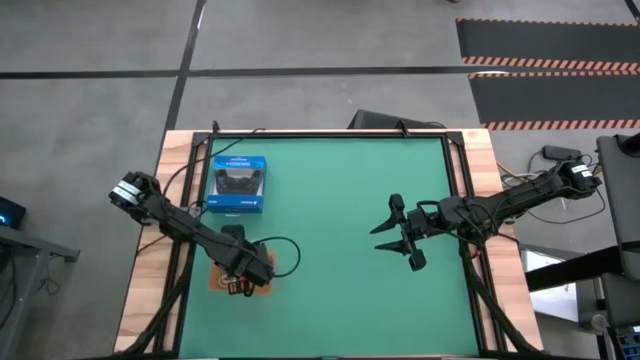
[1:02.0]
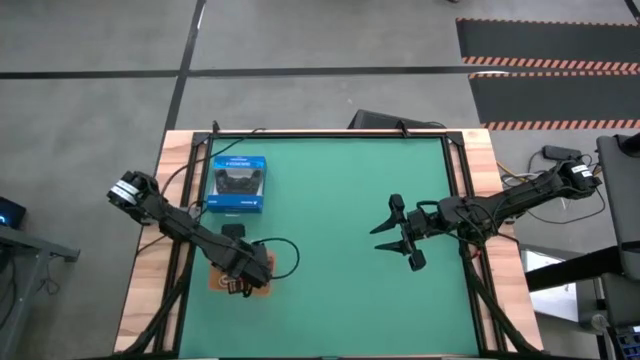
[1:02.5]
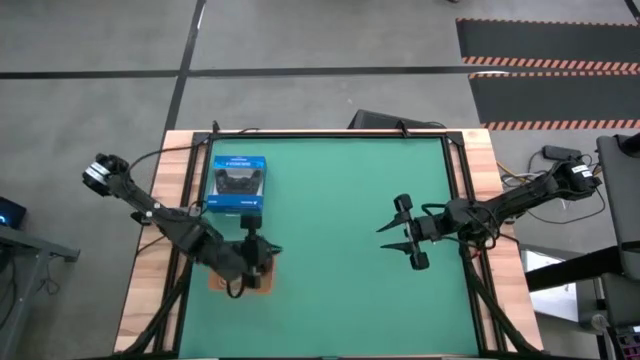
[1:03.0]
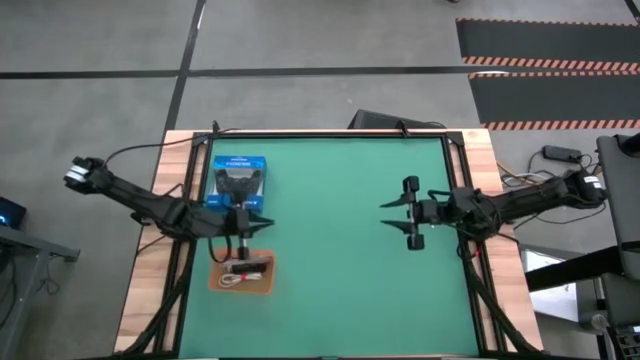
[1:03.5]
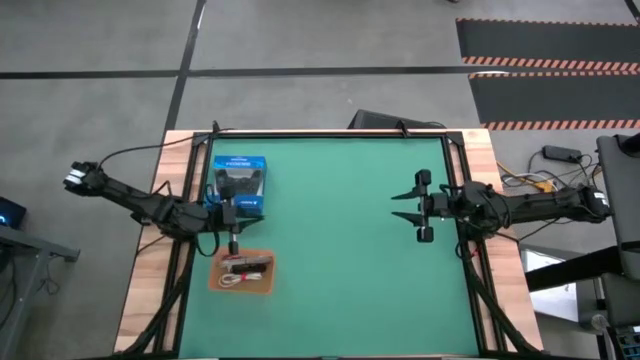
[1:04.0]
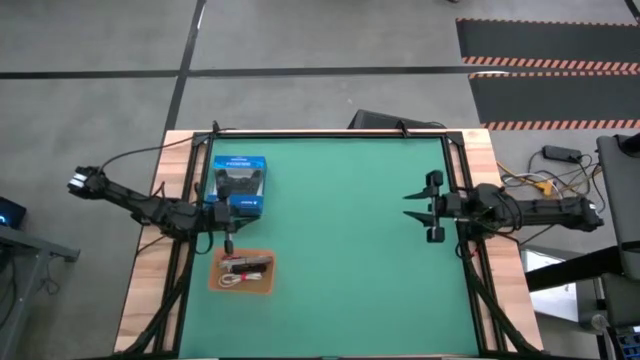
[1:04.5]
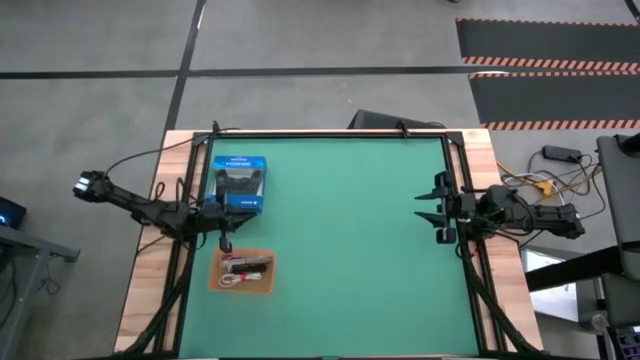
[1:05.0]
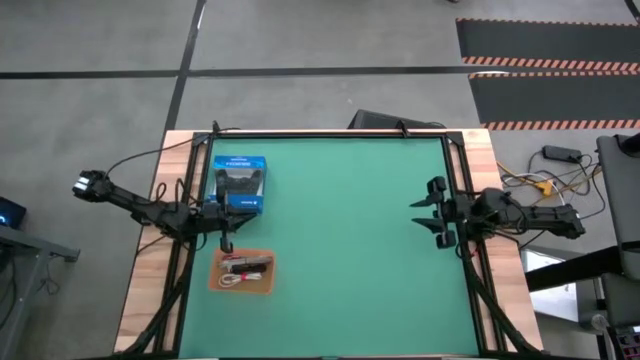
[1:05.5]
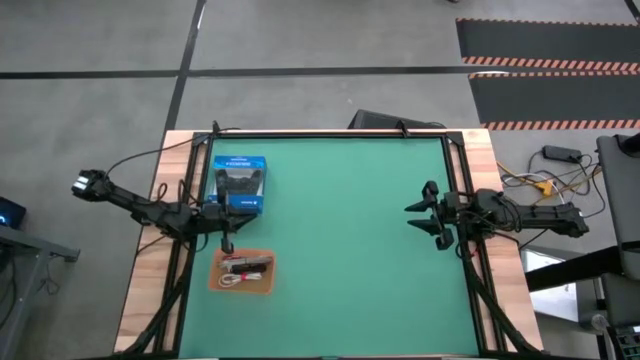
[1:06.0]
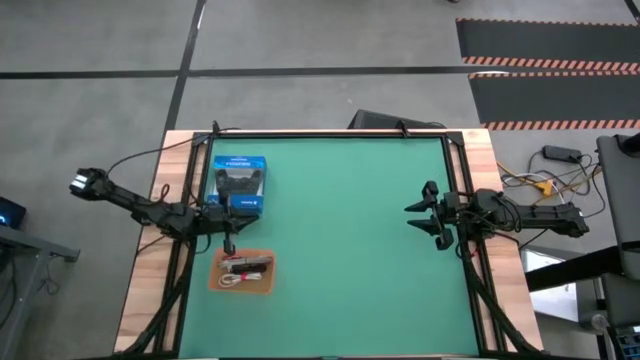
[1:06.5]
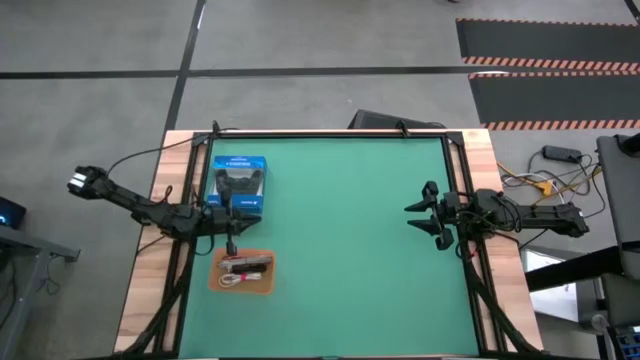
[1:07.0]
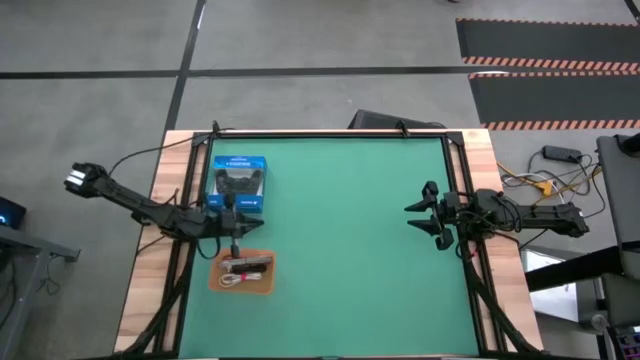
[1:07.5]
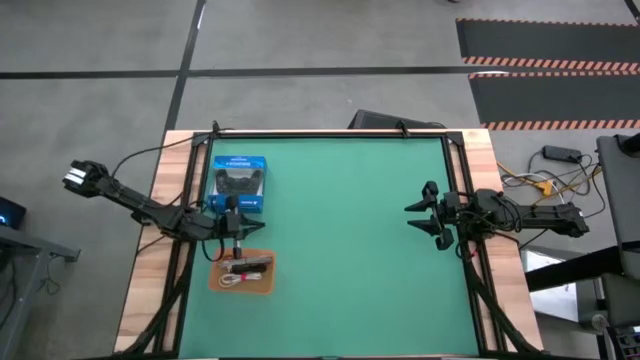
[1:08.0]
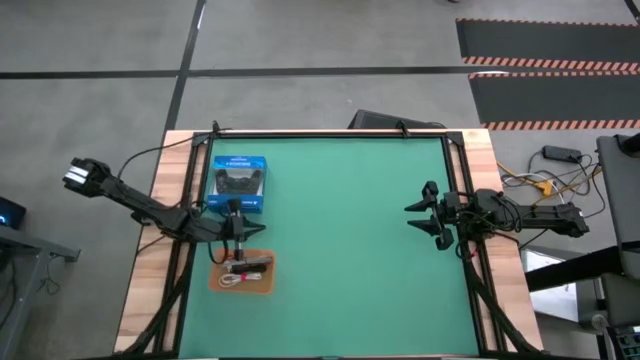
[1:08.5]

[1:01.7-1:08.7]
Task: Pick and place USB-C Cables
Return to Home Position

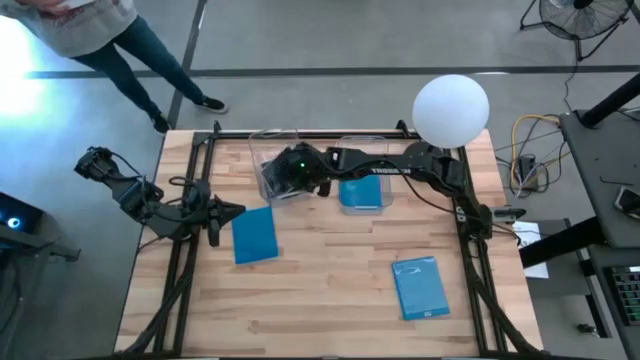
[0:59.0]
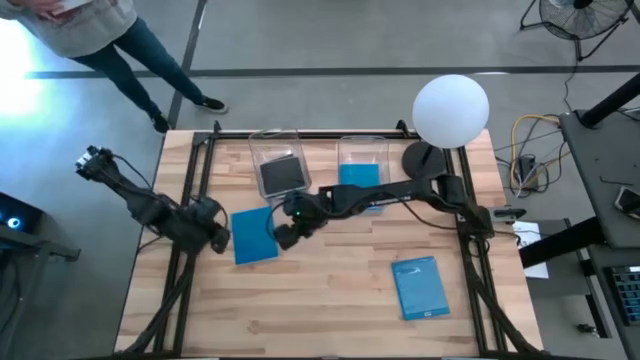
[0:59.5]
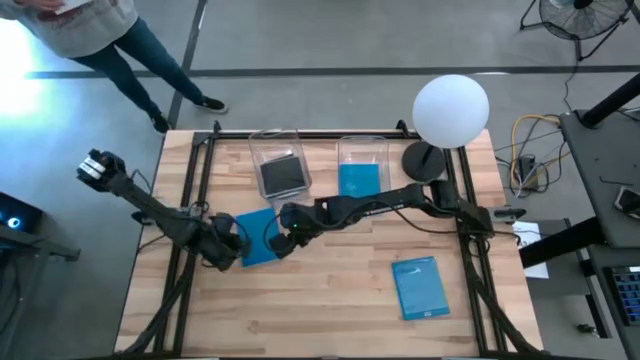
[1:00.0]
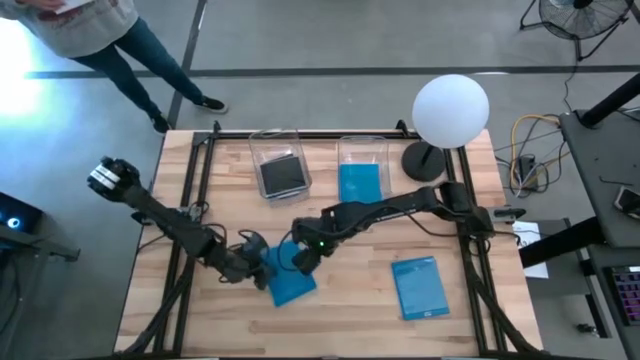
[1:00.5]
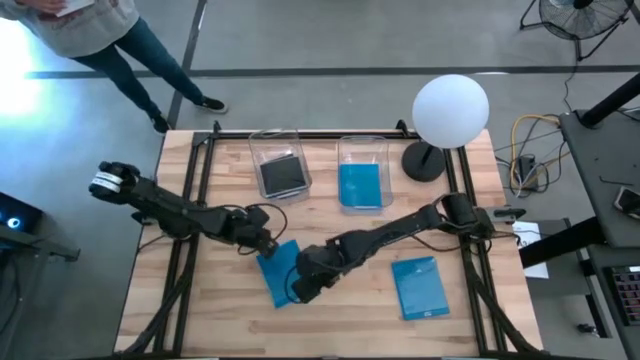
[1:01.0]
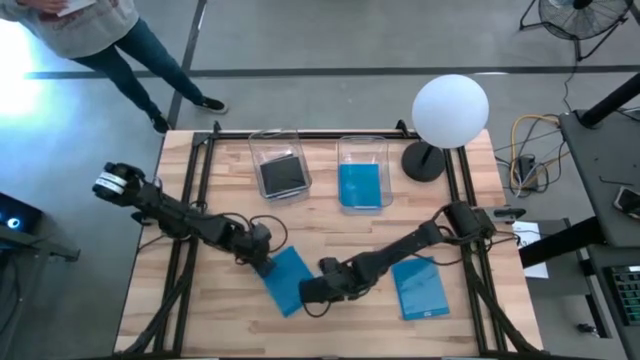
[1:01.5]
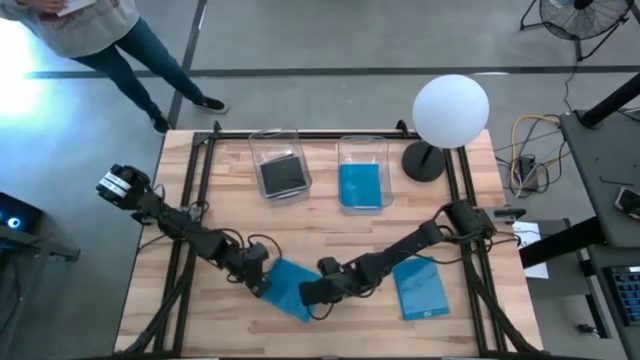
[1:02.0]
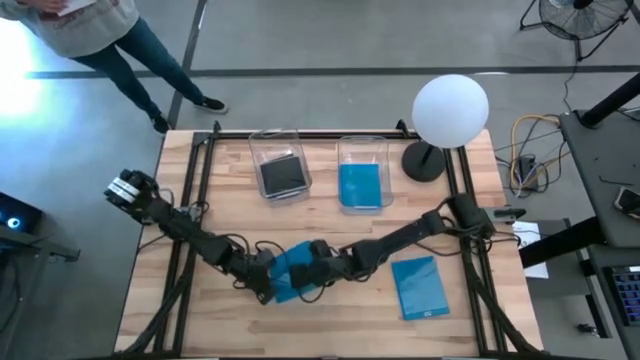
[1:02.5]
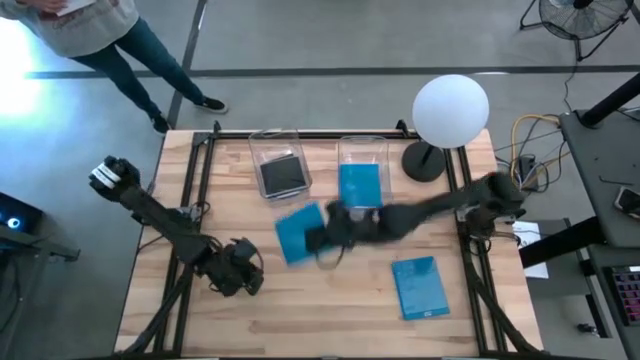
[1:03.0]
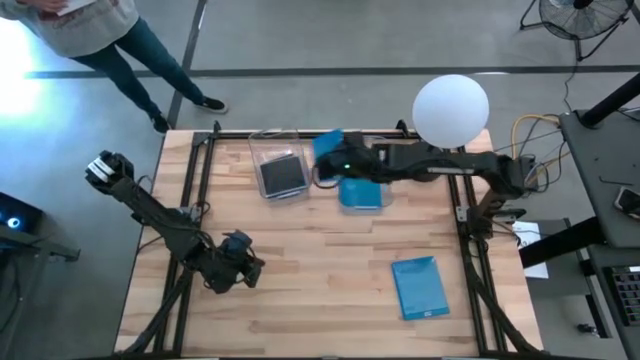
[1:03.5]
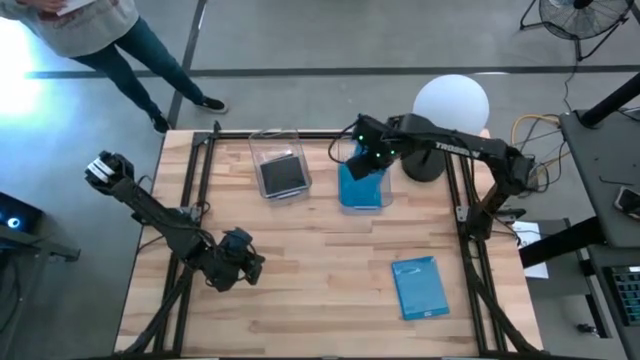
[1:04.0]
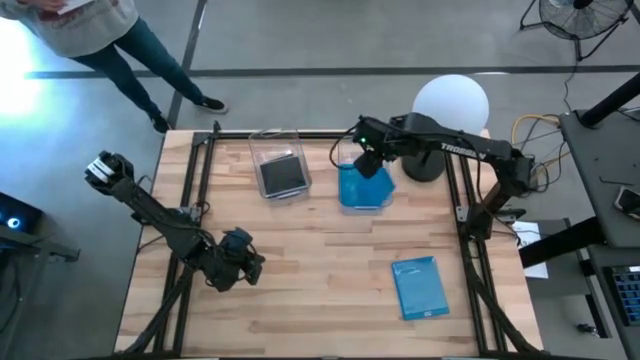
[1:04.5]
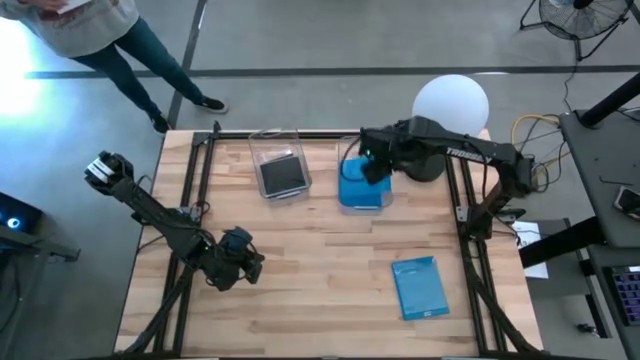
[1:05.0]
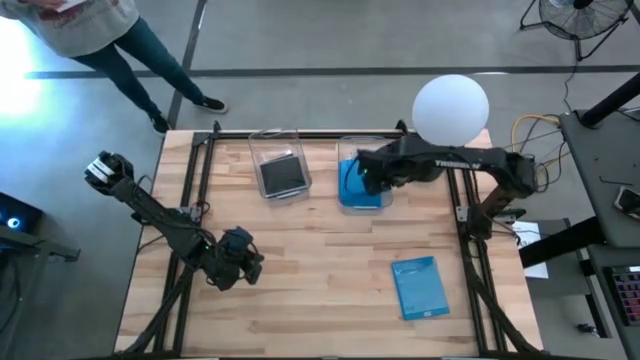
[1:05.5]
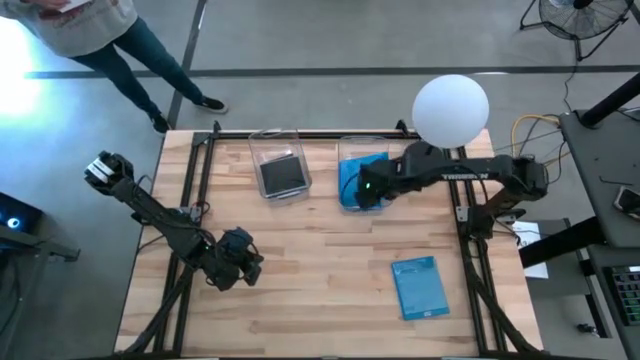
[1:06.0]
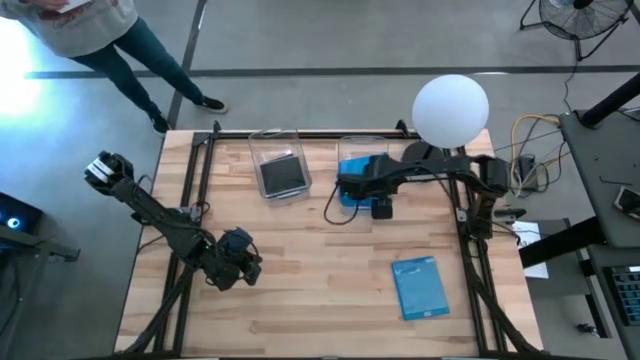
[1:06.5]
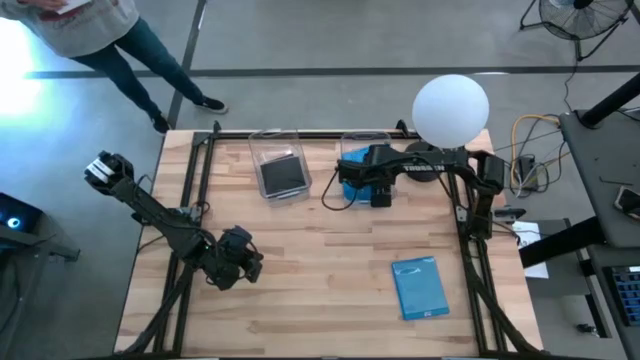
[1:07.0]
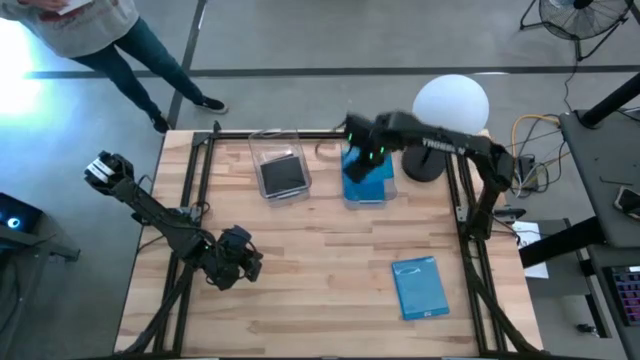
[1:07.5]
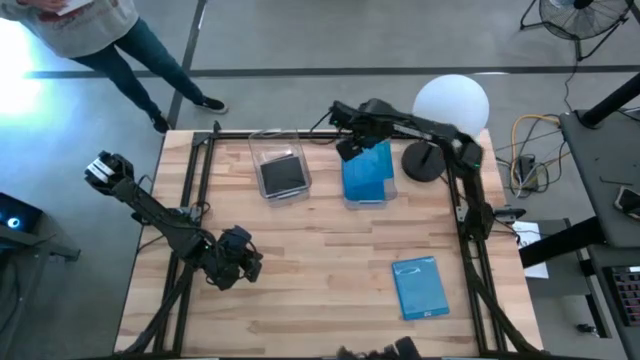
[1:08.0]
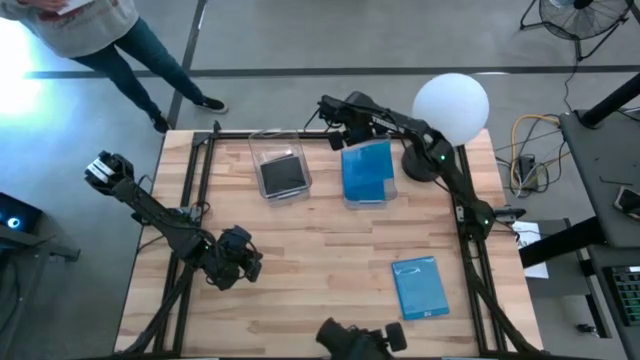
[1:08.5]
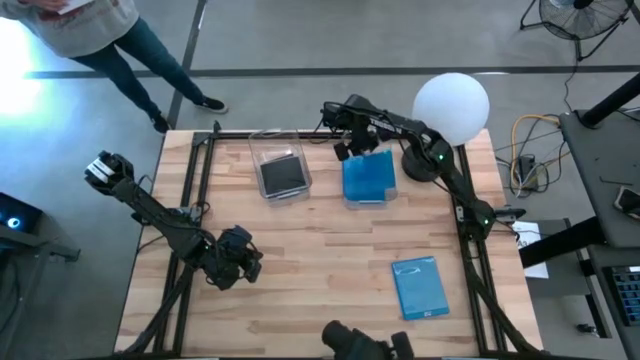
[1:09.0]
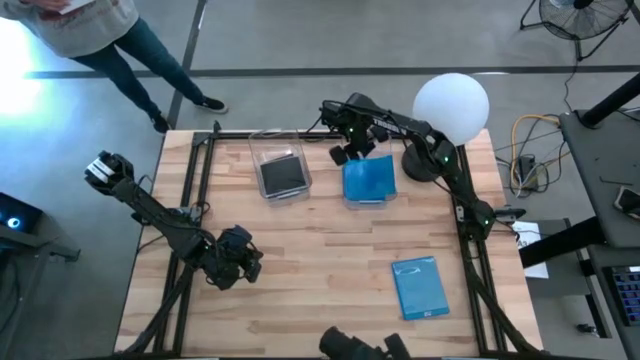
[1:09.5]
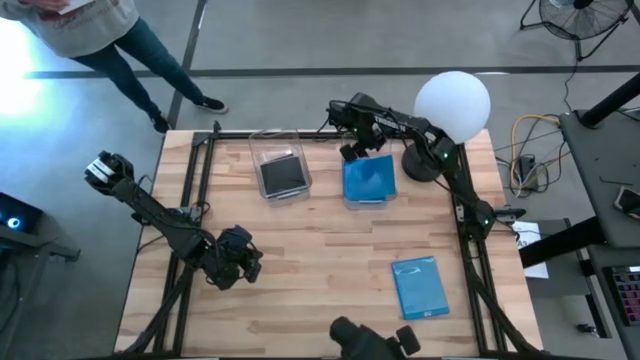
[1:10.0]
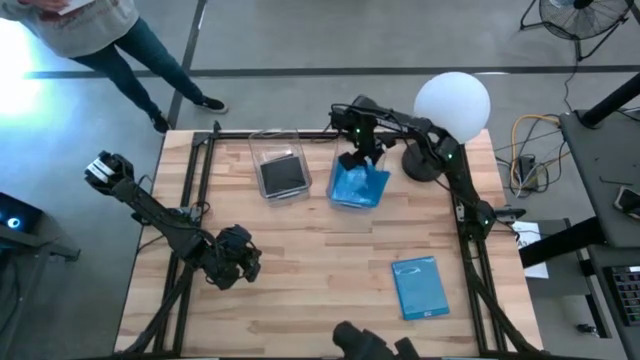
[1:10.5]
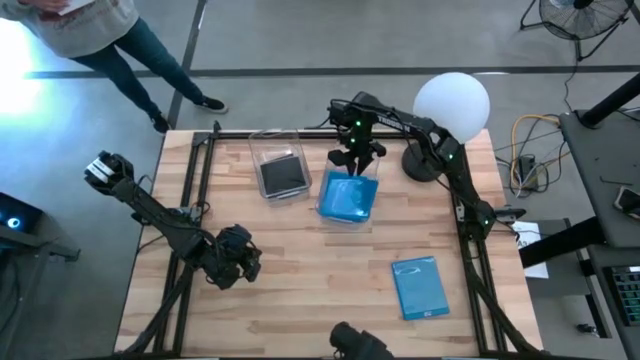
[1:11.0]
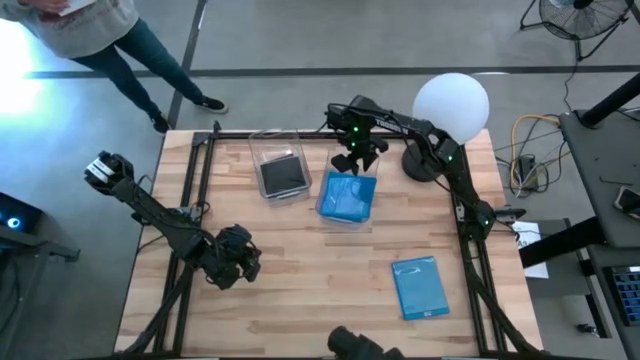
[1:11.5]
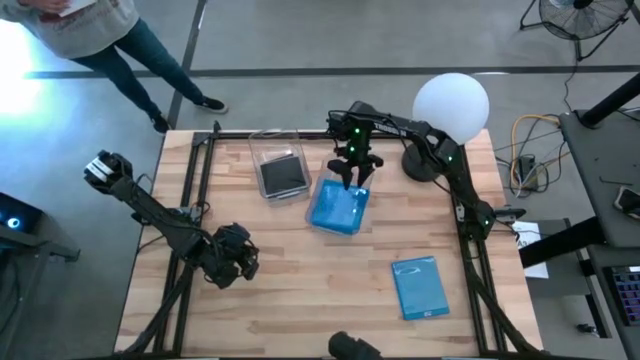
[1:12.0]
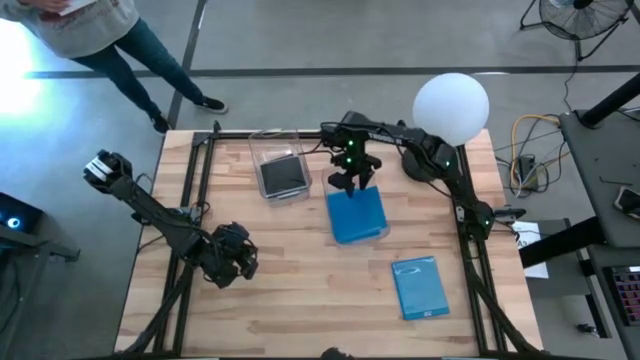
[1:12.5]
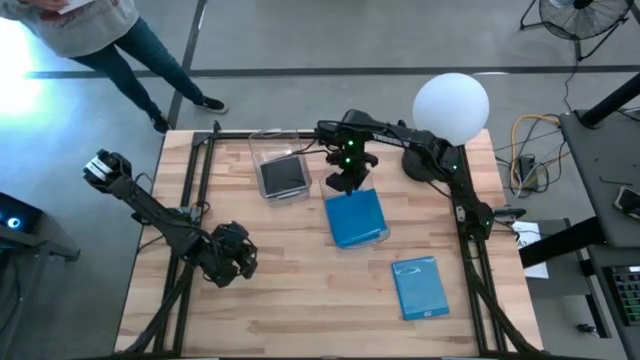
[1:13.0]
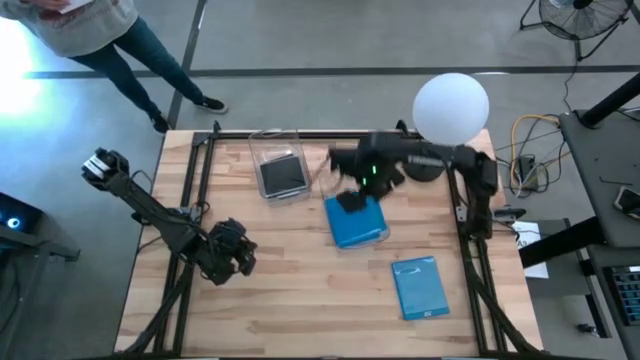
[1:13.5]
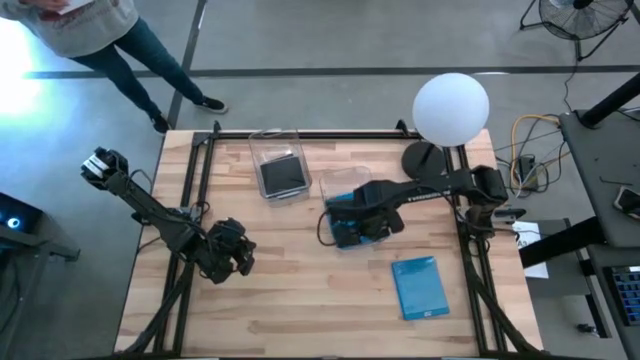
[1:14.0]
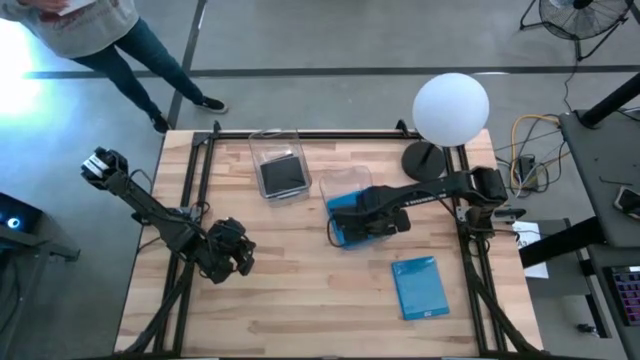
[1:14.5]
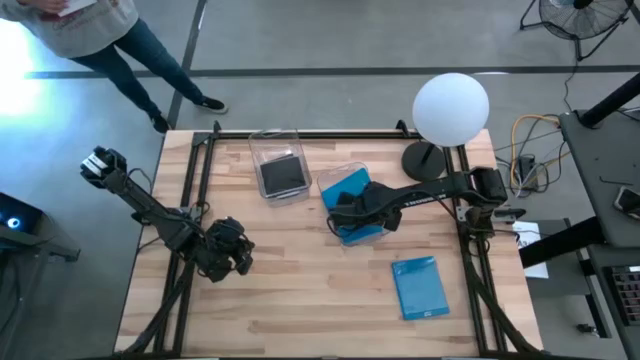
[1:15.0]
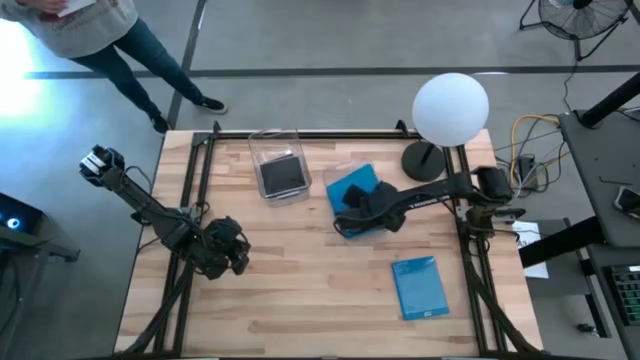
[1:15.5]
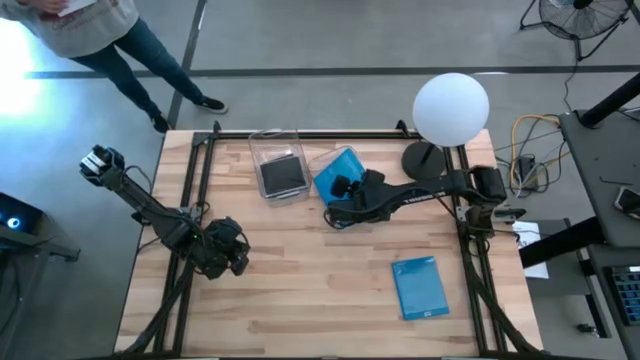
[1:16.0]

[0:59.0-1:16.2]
Task: Pick & place jewel cases by type
Put the left blue CD case into the right transparent bin
